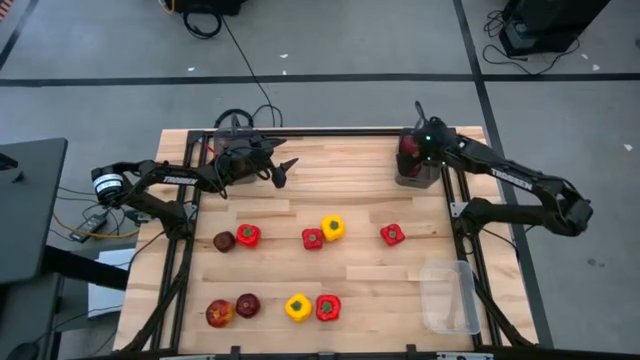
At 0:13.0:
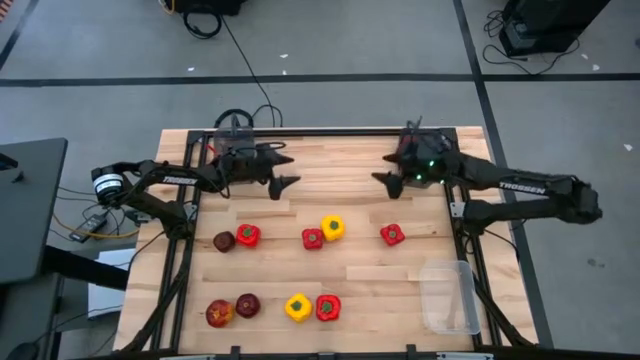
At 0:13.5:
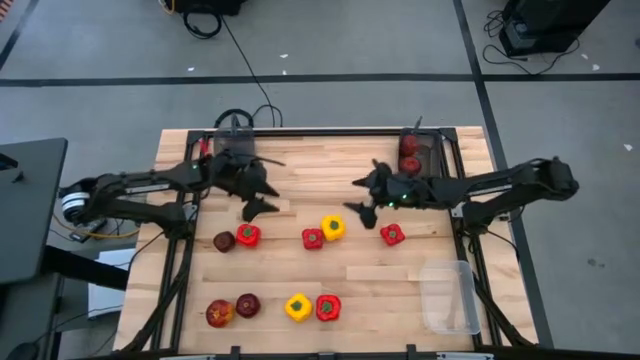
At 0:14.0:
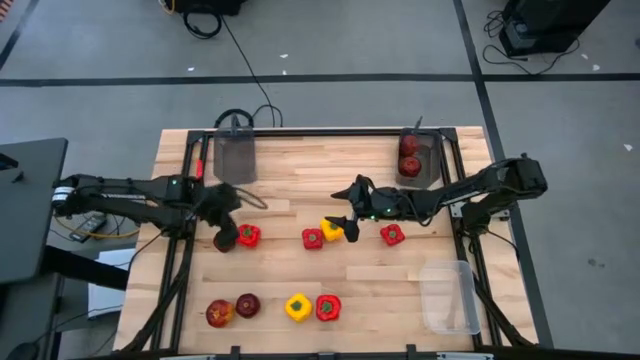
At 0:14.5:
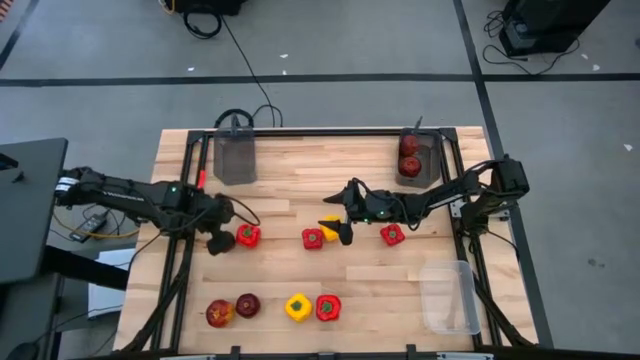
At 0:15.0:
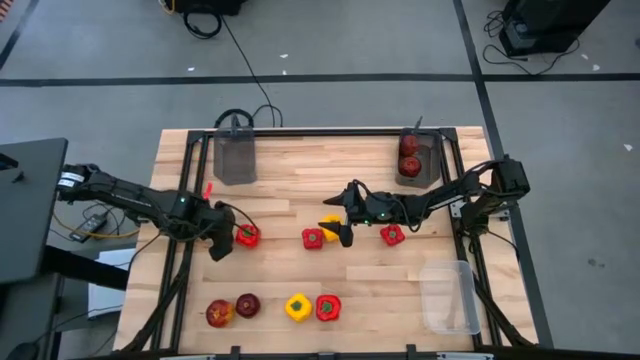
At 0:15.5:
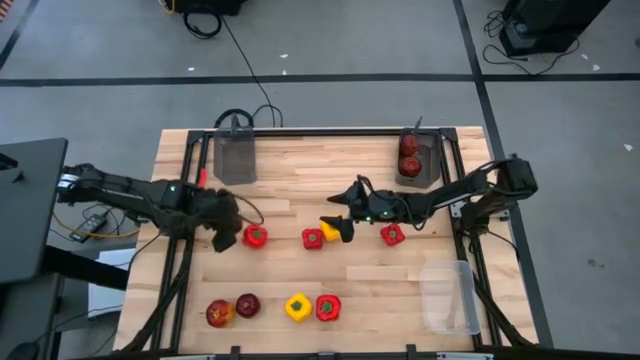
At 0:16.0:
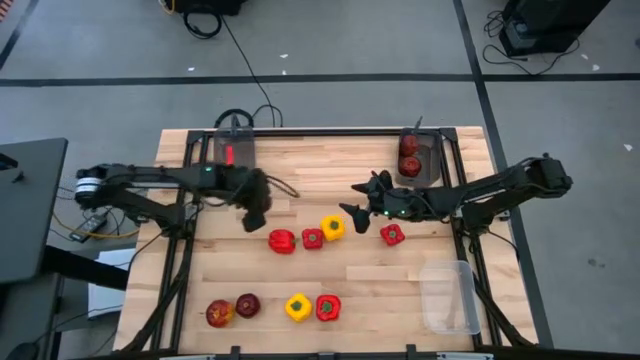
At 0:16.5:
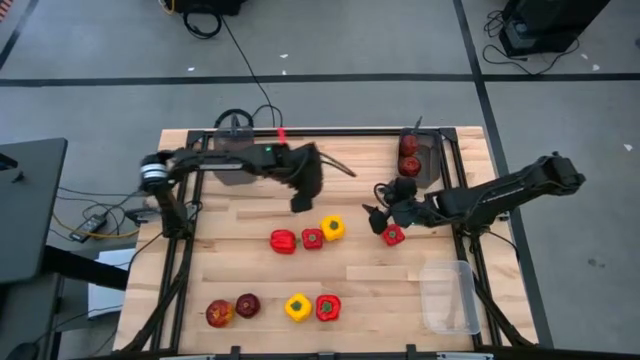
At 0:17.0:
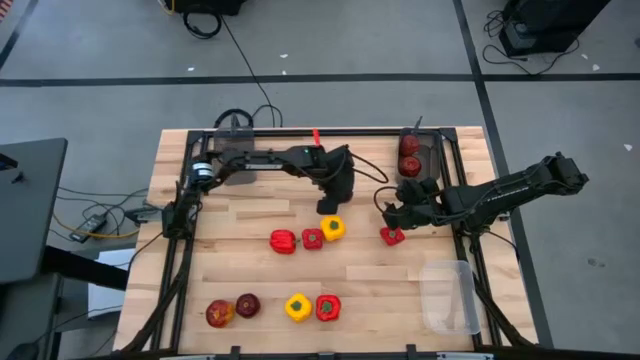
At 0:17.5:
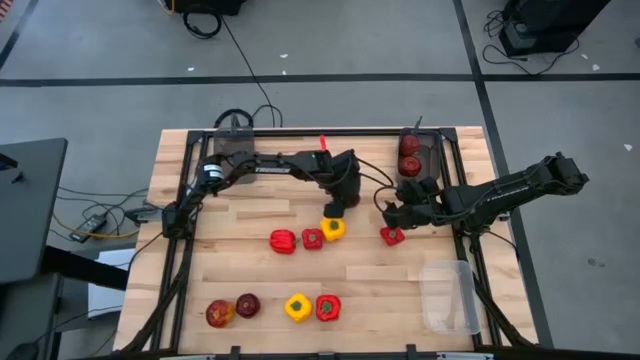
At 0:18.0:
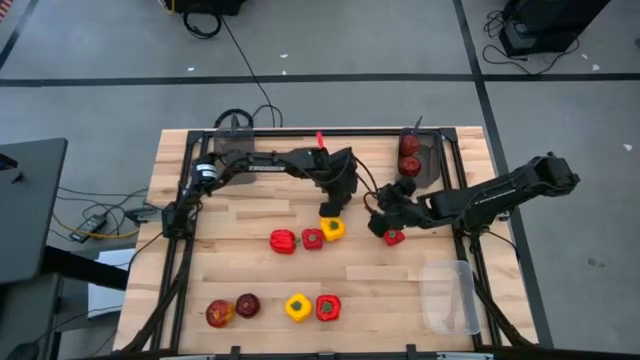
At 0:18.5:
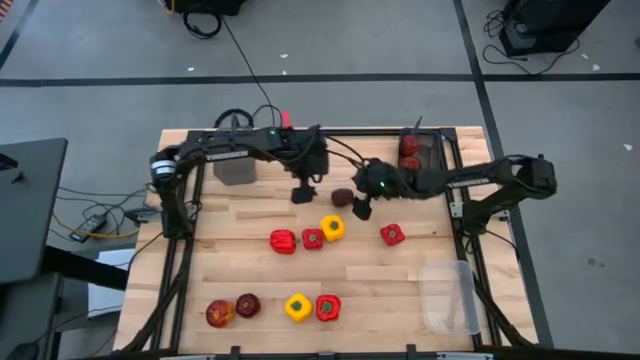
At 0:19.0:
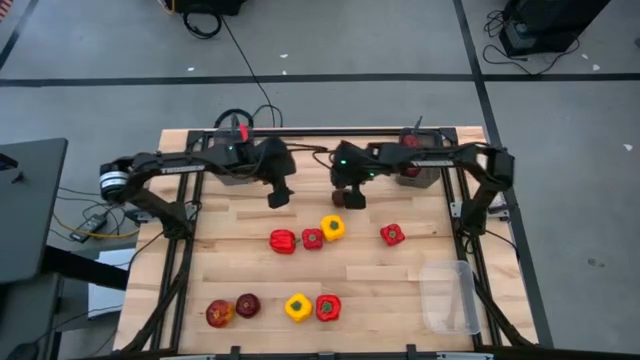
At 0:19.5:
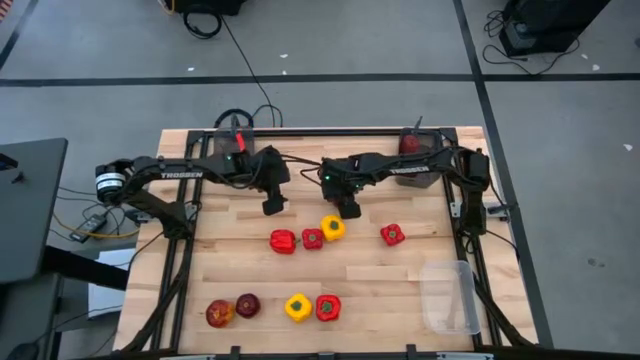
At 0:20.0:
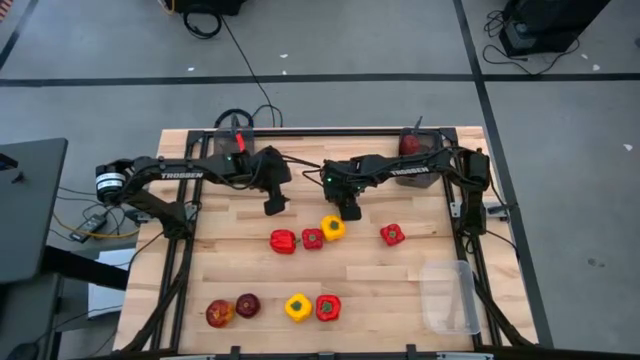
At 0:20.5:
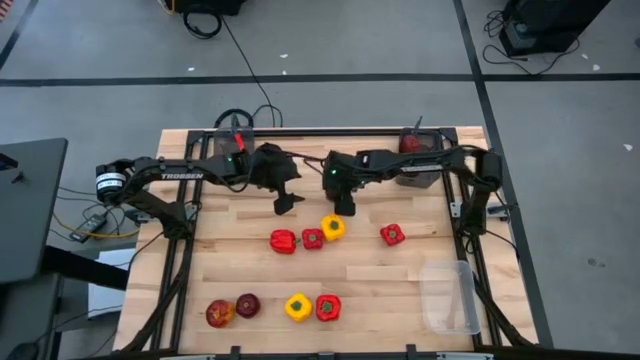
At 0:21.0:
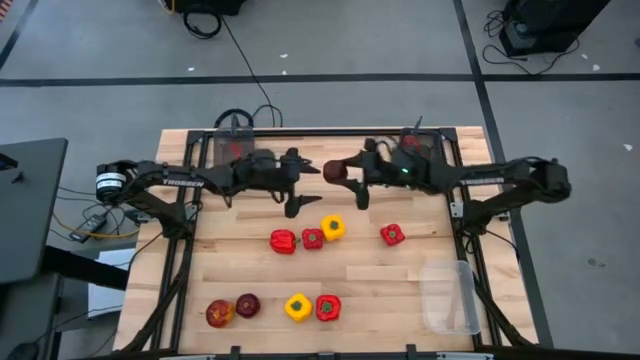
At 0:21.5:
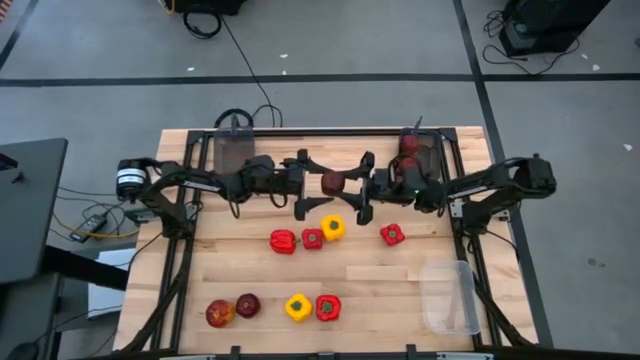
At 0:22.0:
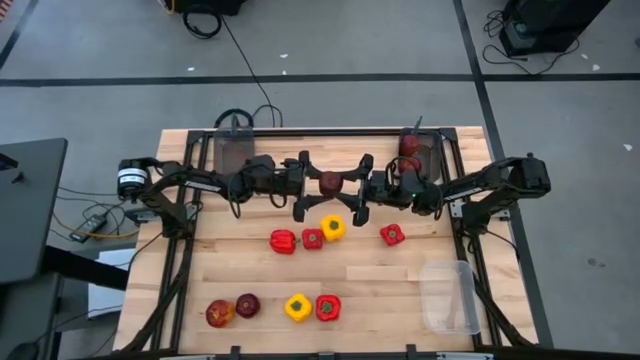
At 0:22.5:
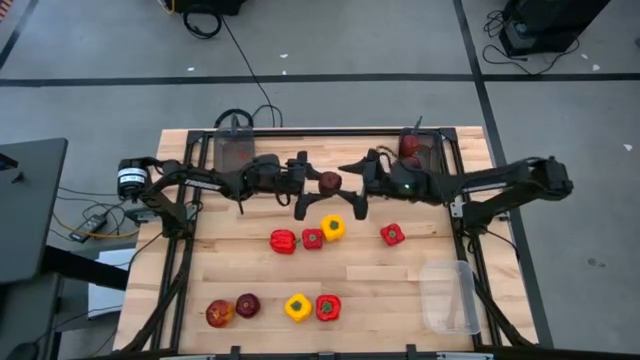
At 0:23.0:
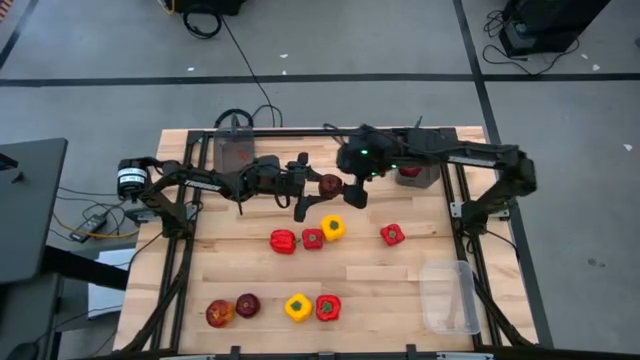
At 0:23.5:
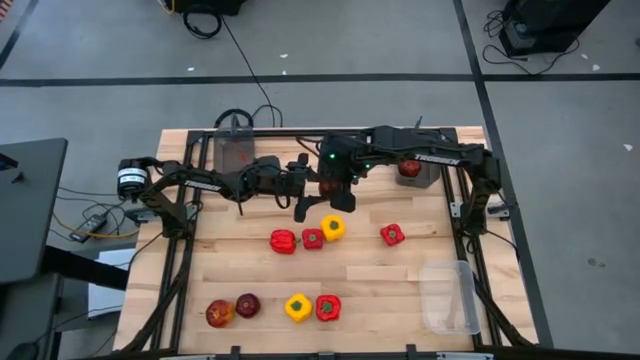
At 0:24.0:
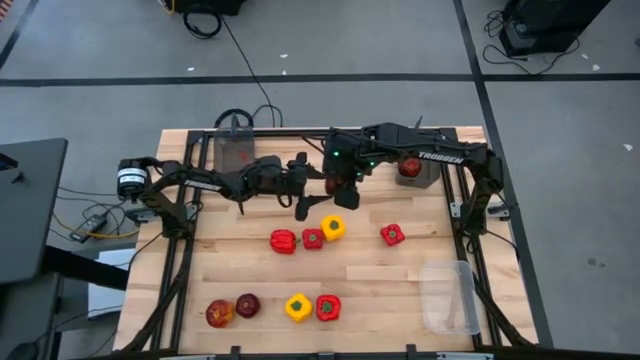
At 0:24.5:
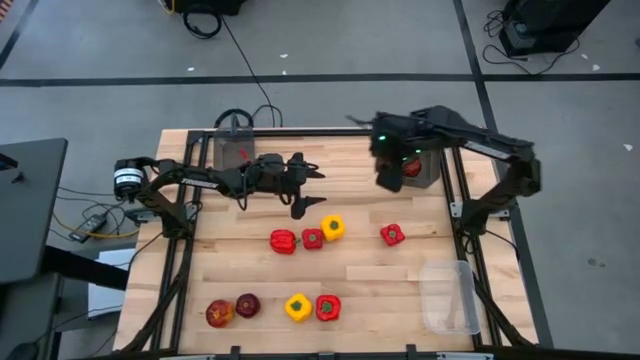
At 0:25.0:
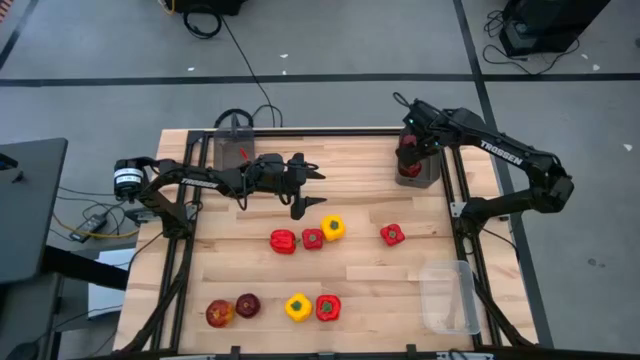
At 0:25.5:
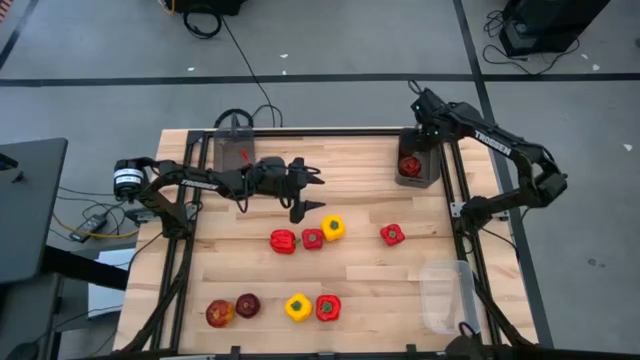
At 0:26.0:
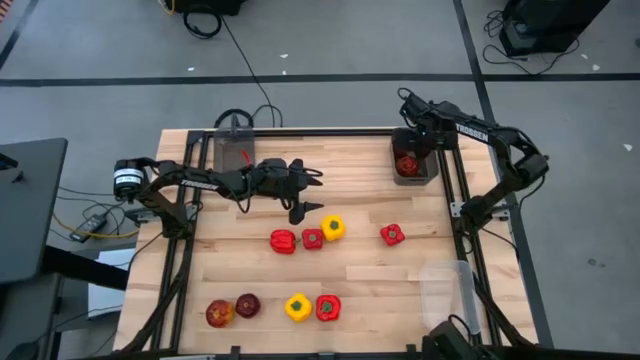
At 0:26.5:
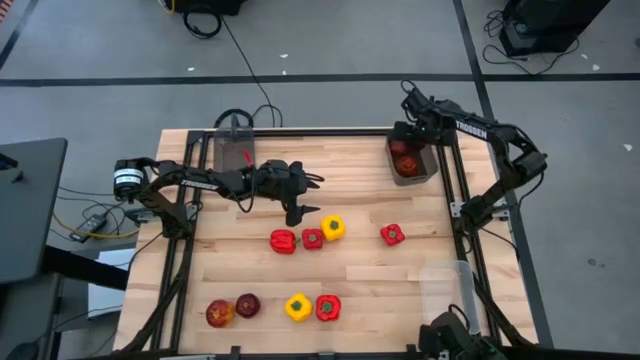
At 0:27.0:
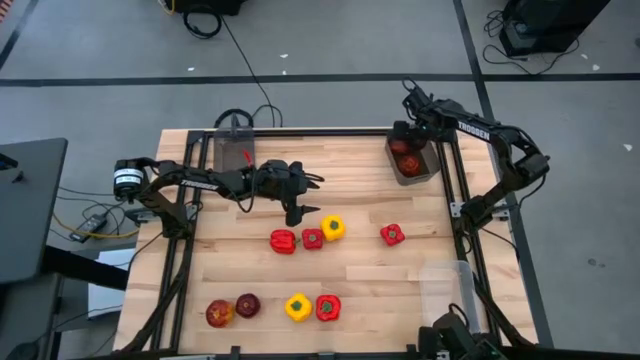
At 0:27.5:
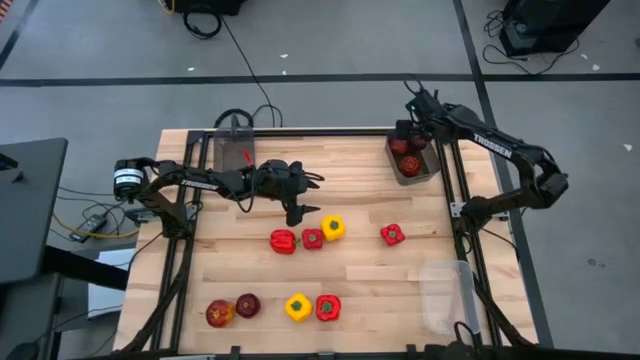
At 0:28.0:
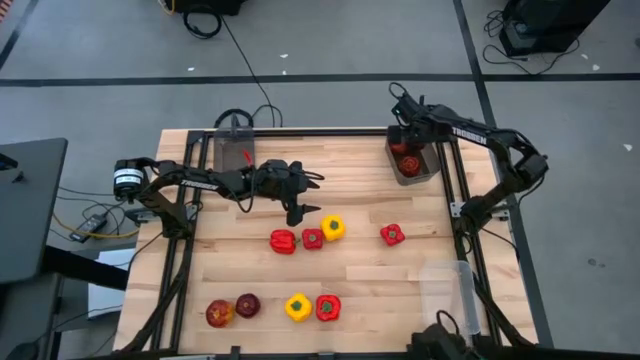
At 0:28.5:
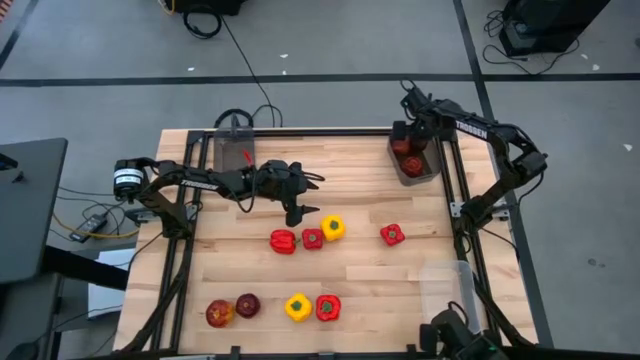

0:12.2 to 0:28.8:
Task: Sort produce into baskets
Put the top apple into the right dark gray bin

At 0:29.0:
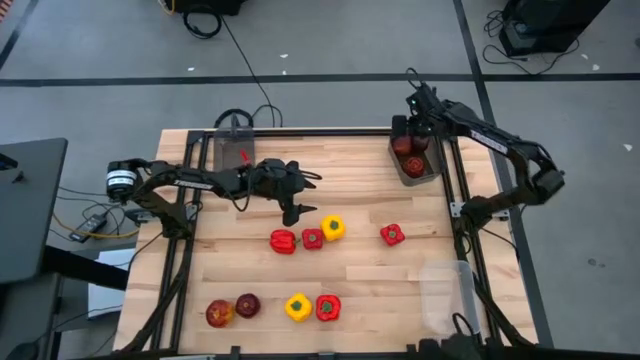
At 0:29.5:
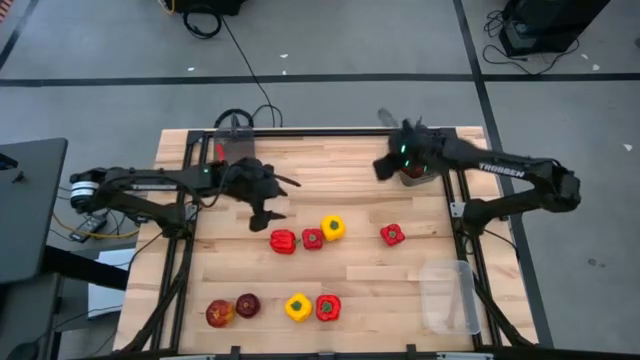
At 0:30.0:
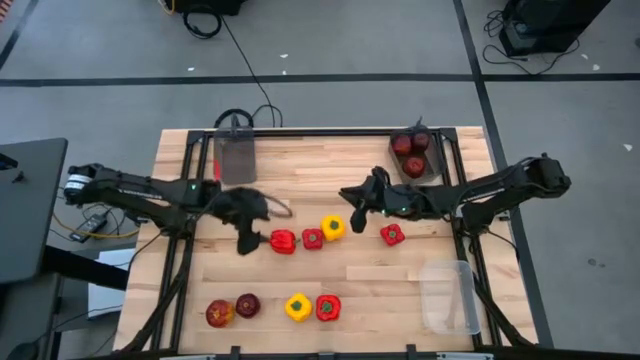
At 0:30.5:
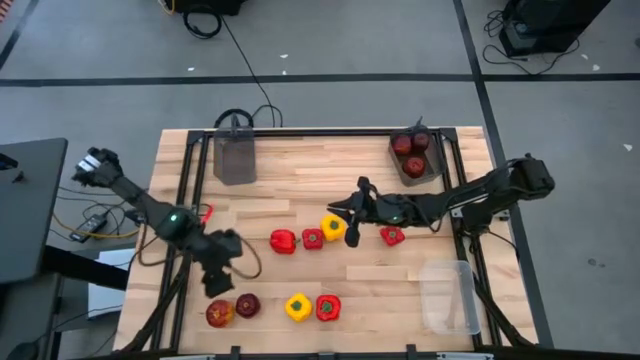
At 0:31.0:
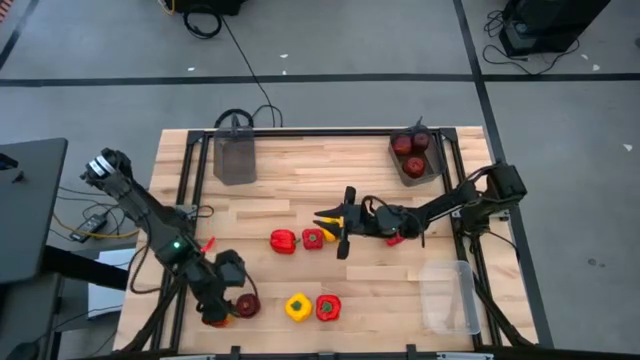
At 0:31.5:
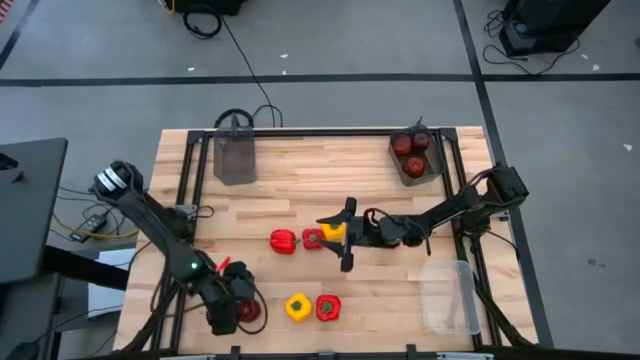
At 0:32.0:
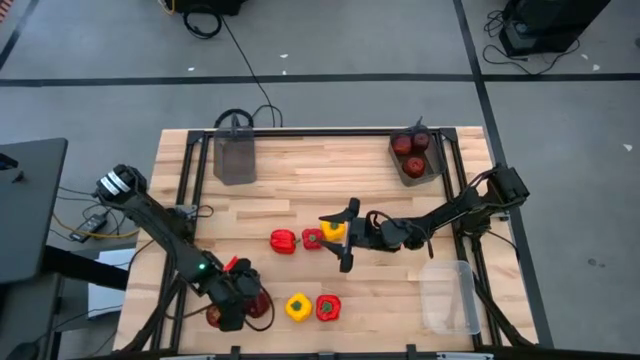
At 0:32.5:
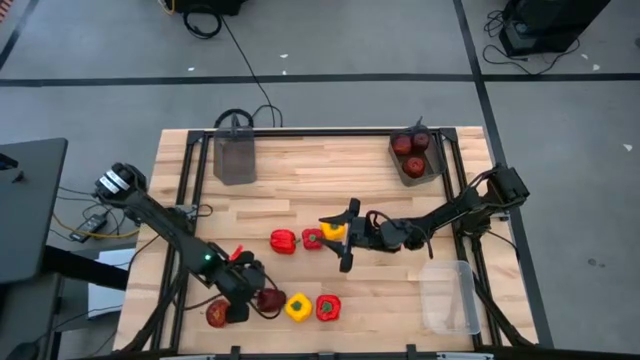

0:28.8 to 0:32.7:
Put the right apple into the right dark gray bin

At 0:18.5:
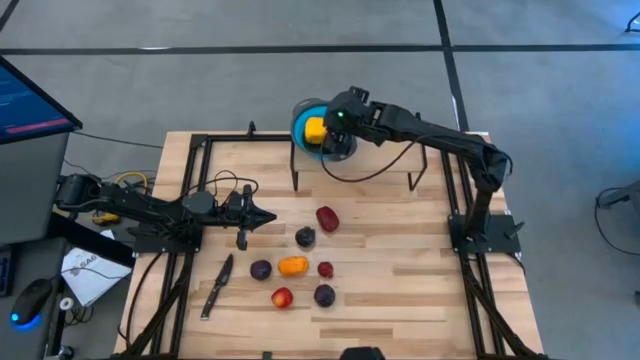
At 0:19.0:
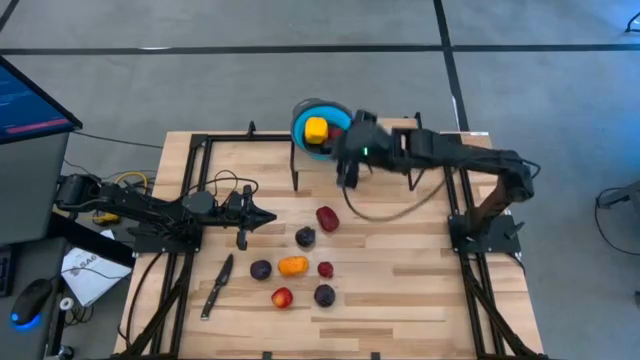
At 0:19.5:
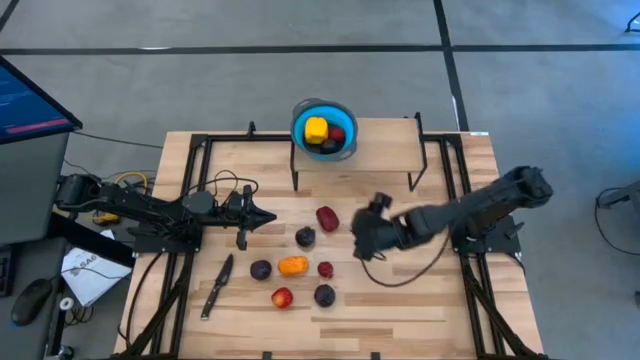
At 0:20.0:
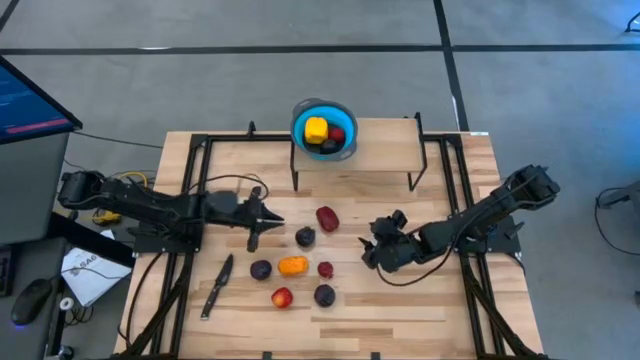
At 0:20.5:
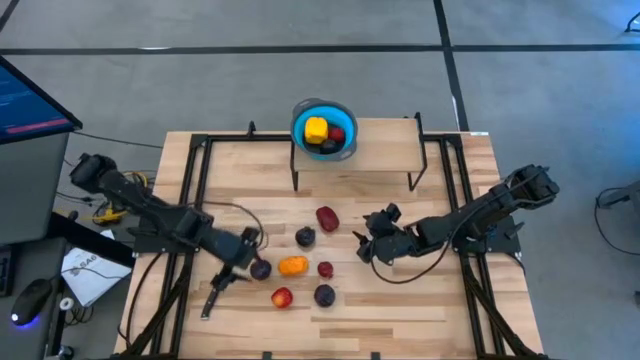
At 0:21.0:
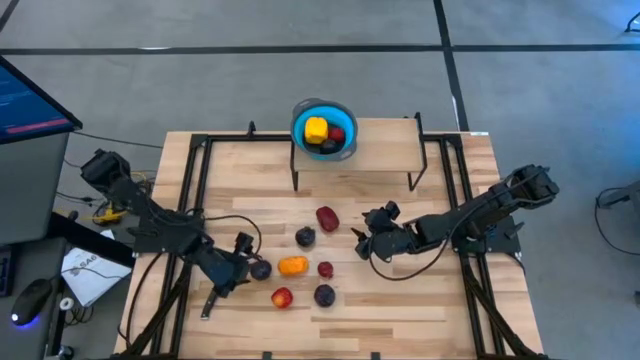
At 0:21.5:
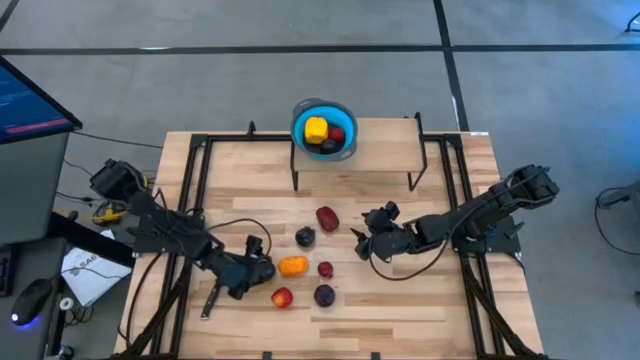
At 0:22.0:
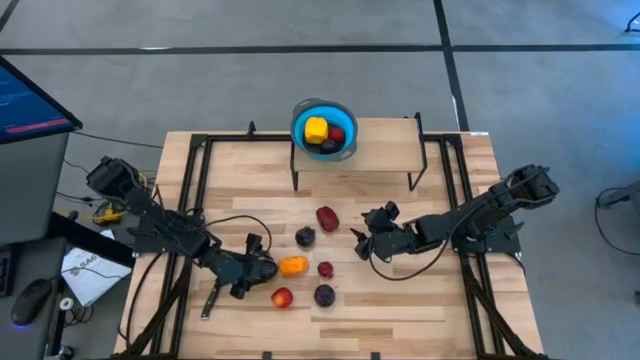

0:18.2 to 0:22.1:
Task: Pick & Place Fruit
Put the left purple plum into the blue strainer bowl on the shelf
